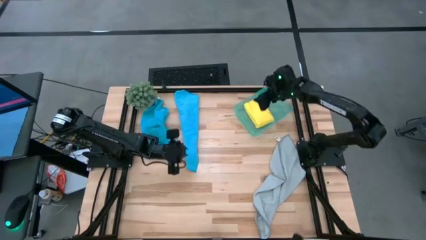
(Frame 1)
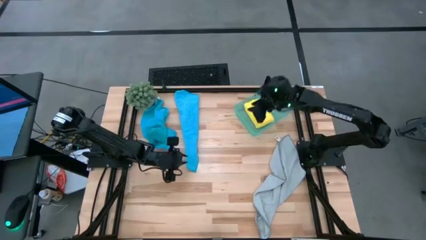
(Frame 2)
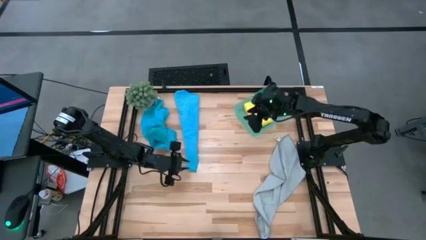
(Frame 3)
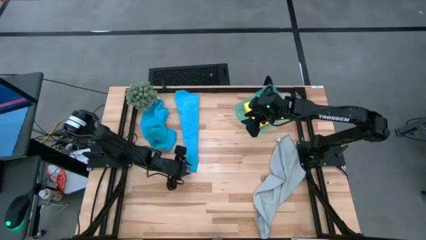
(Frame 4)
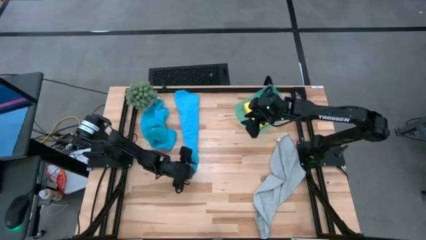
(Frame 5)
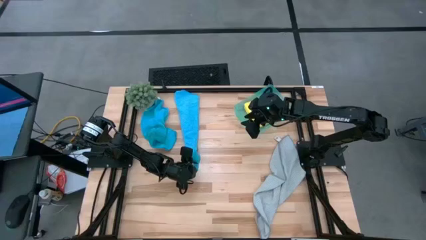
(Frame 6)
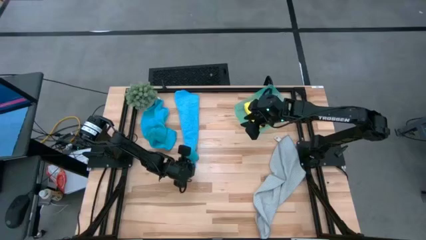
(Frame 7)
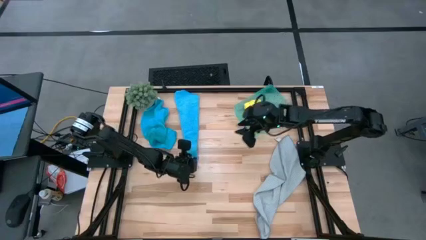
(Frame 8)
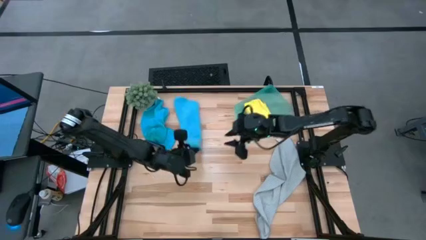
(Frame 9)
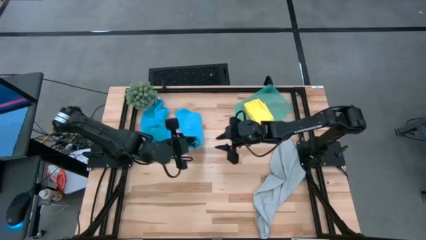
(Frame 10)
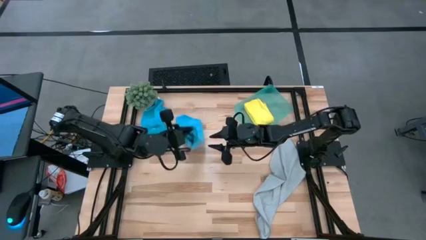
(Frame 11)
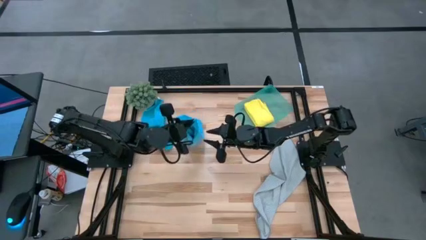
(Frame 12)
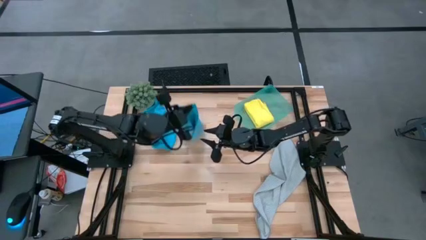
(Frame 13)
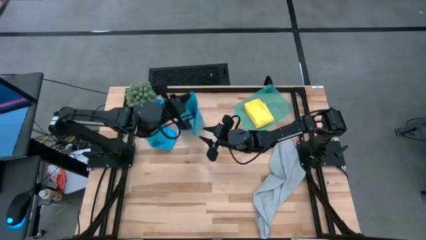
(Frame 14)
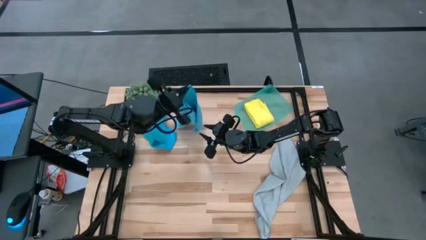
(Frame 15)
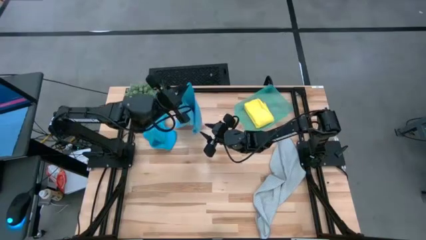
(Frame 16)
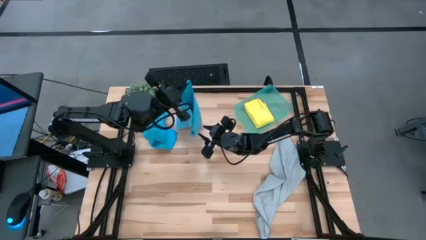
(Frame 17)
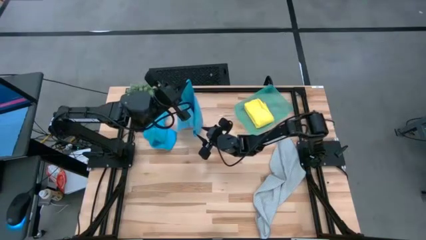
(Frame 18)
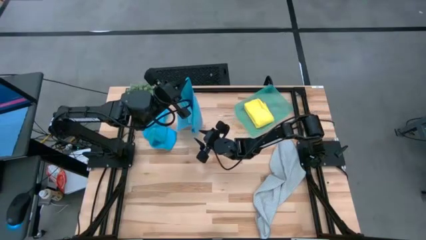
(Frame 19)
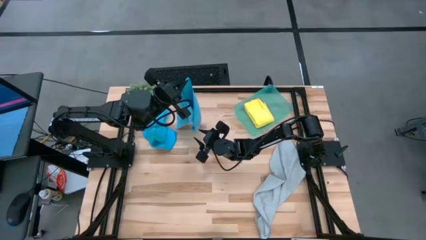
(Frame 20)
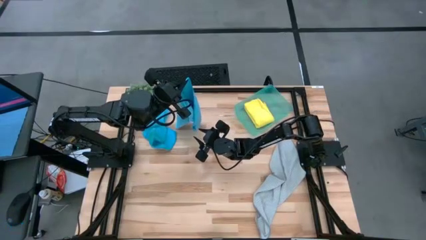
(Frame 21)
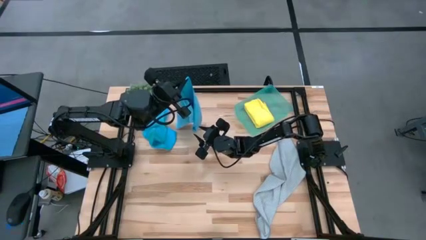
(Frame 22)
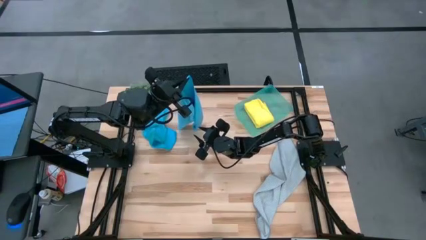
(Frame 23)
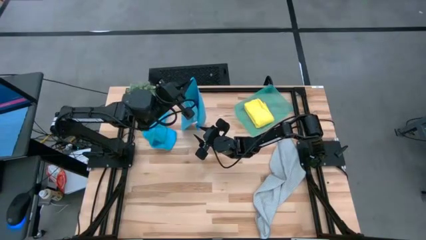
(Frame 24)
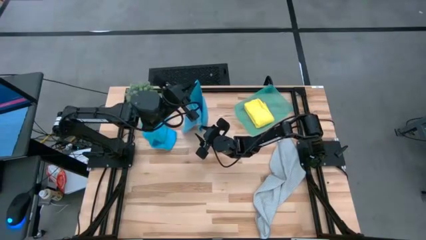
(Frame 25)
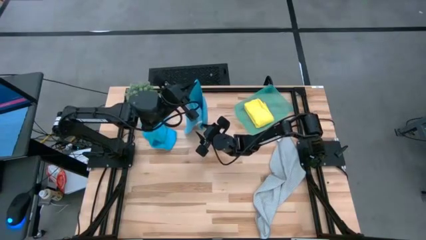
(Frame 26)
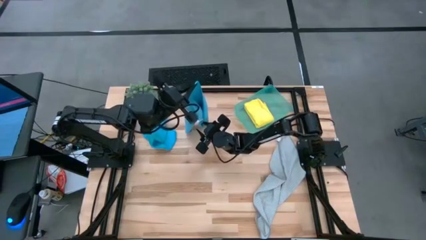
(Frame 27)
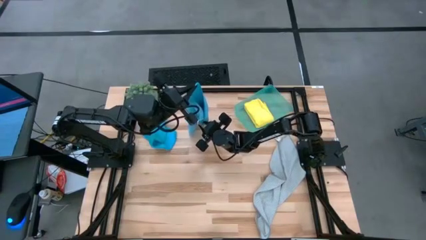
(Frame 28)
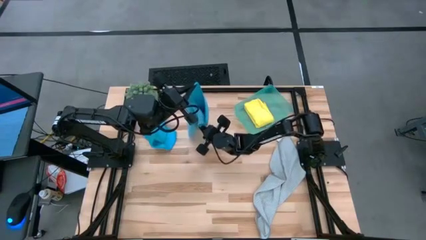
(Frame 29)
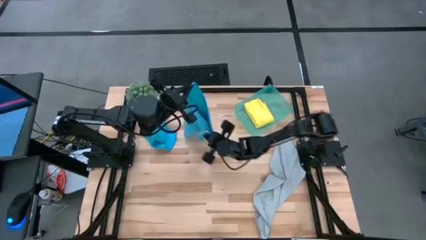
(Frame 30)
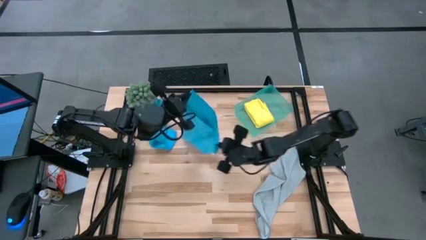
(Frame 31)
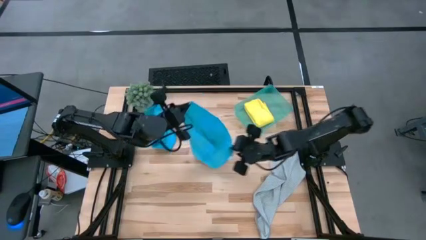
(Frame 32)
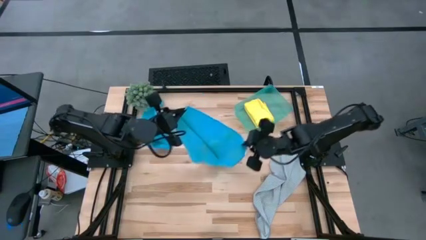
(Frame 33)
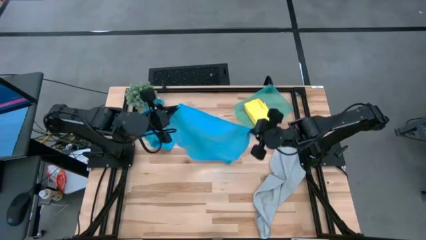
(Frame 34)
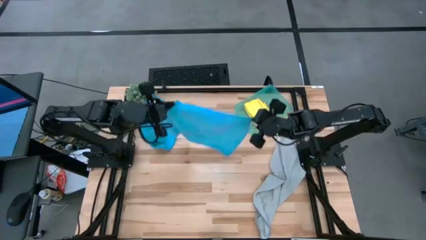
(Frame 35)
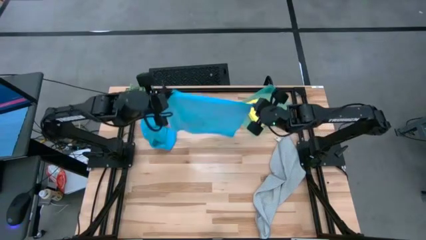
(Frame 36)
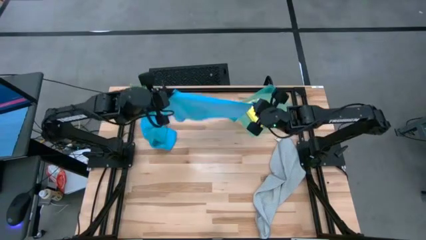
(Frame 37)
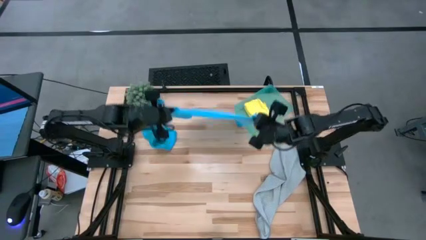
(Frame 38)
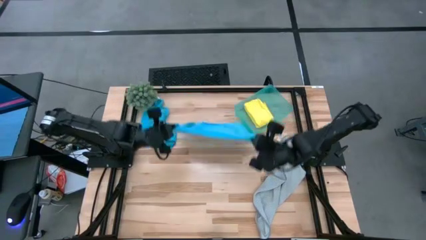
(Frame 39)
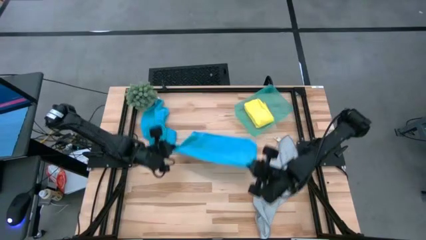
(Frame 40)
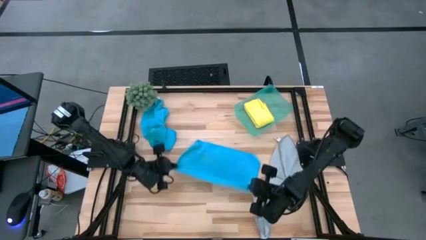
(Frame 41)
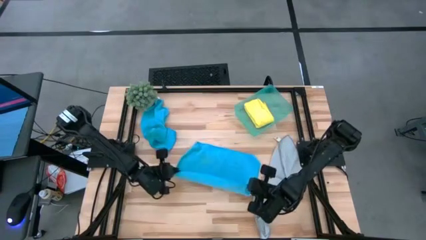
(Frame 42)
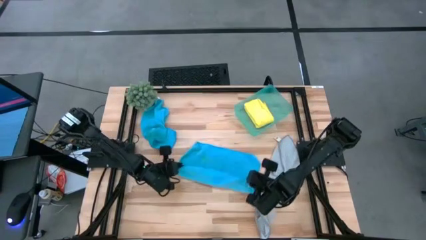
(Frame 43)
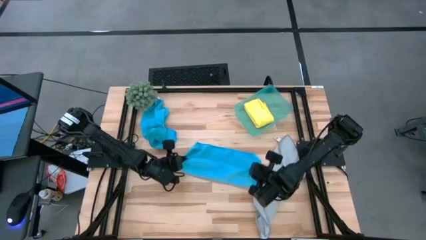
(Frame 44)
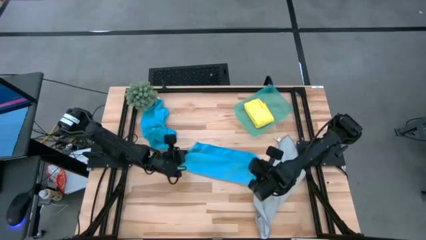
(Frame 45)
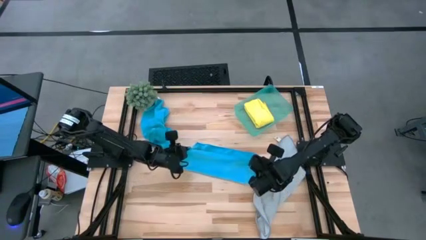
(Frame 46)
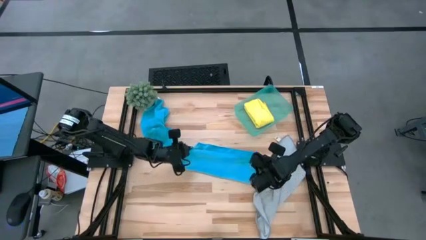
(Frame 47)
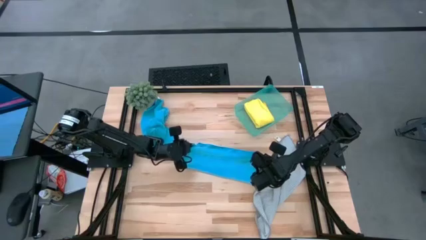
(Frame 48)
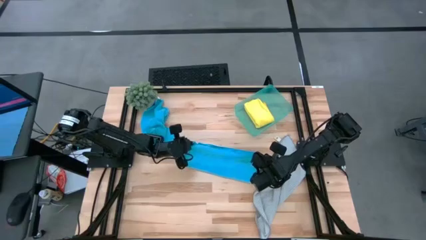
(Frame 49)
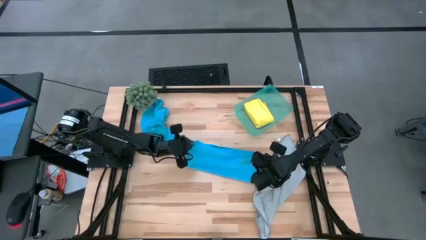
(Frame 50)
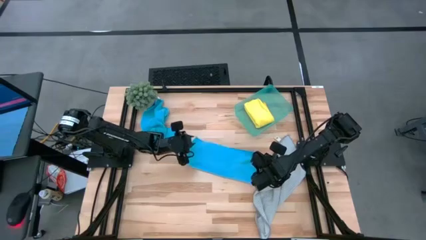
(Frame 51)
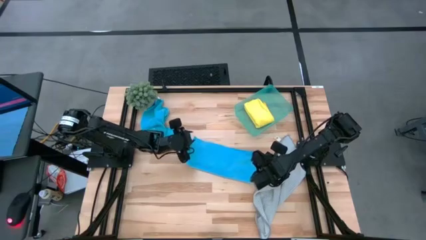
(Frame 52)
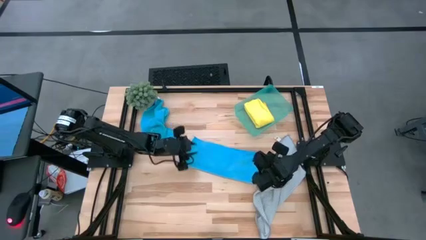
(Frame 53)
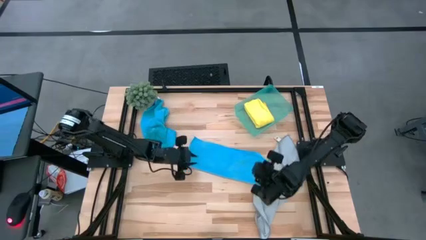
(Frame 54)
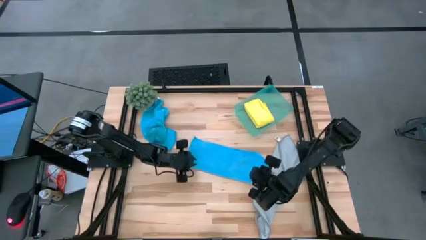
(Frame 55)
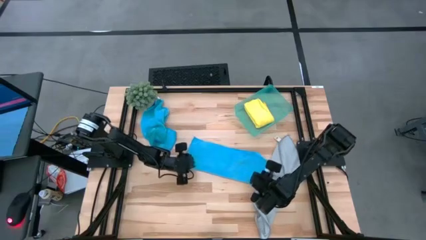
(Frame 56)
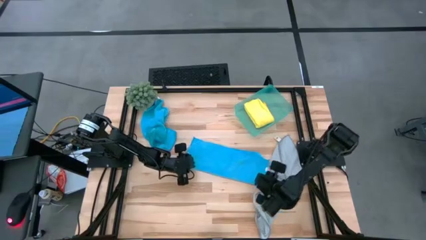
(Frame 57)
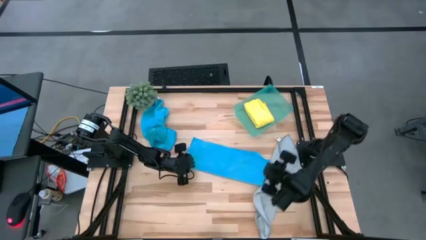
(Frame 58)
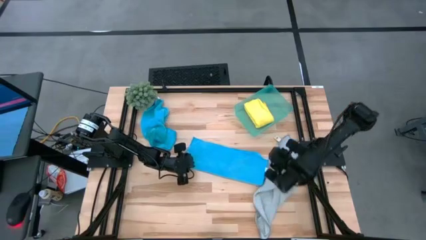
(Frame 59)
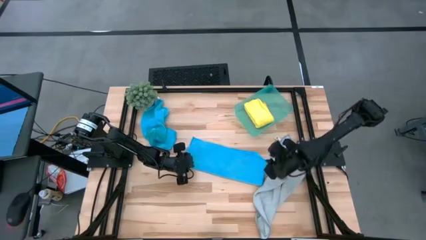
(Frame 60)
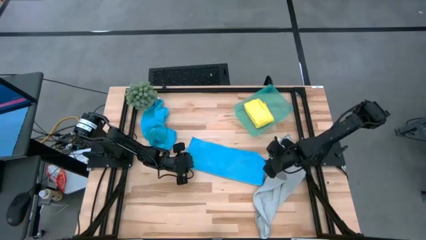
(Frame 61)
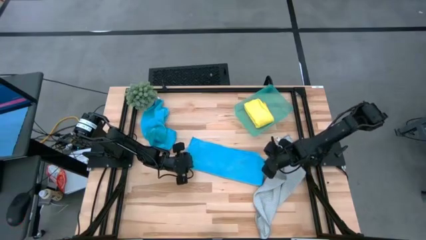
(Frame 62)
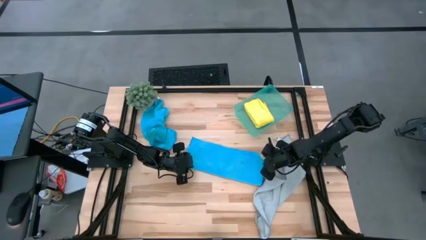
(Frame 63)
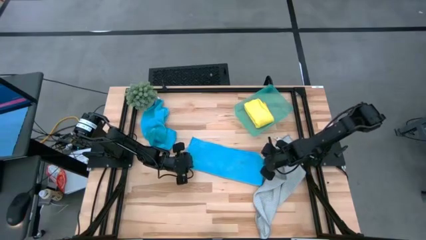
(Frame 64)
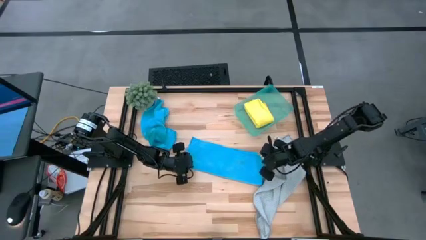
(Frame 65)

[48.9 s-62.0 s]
Task: Fold microfiber towels
Fold the right blue towel

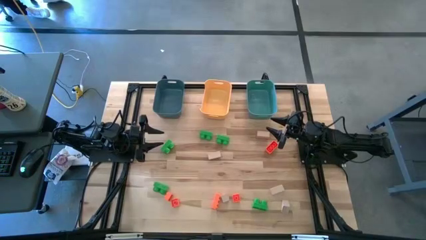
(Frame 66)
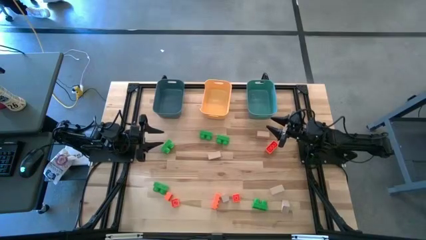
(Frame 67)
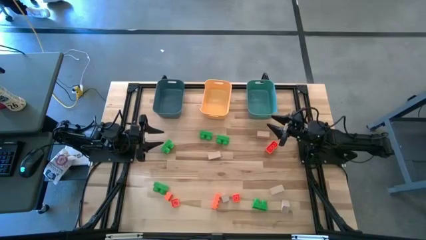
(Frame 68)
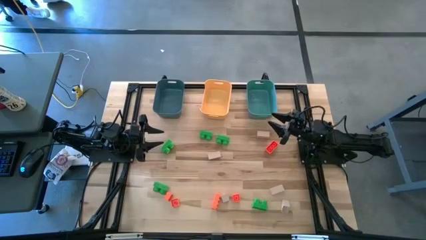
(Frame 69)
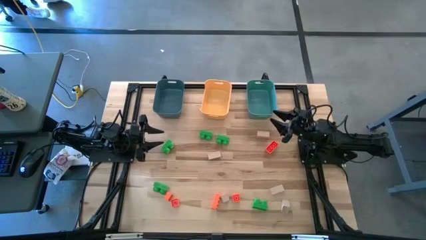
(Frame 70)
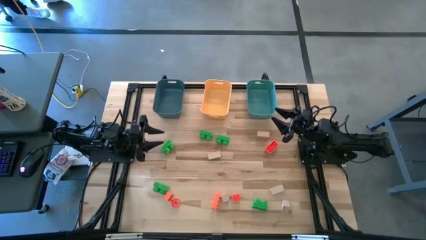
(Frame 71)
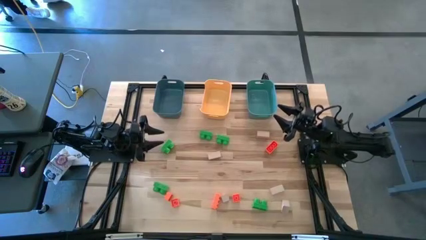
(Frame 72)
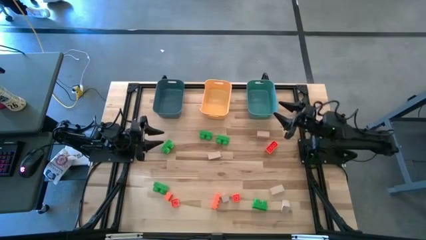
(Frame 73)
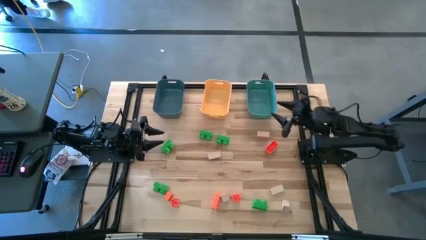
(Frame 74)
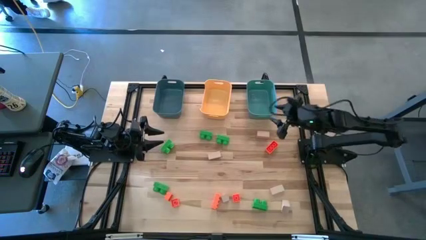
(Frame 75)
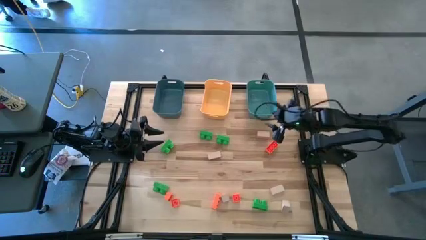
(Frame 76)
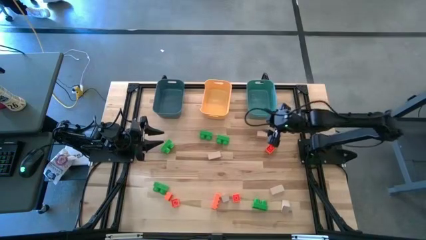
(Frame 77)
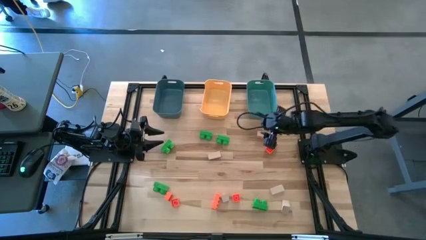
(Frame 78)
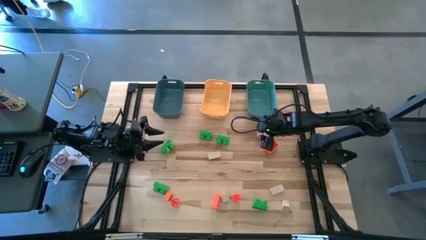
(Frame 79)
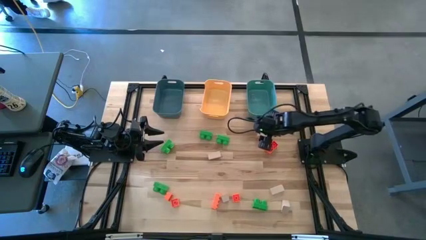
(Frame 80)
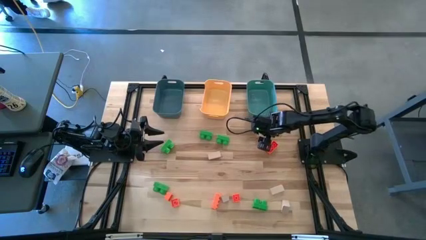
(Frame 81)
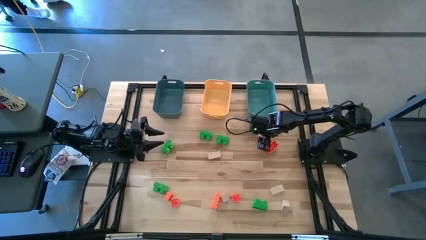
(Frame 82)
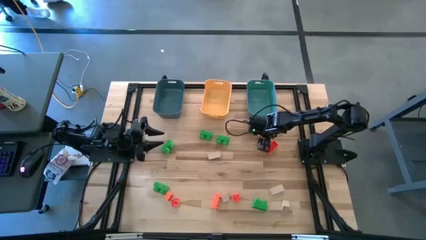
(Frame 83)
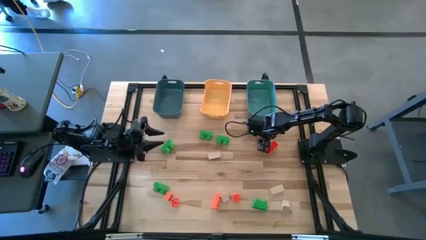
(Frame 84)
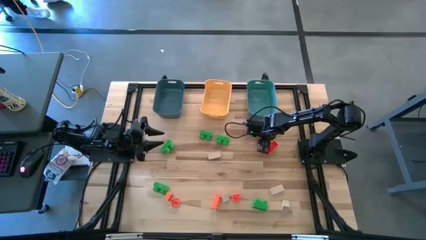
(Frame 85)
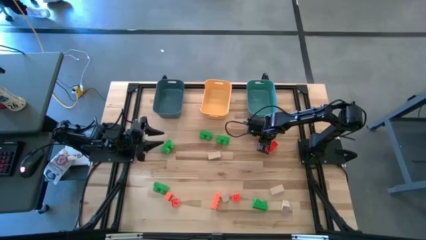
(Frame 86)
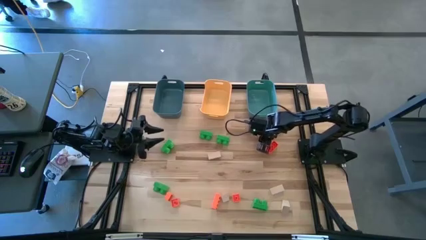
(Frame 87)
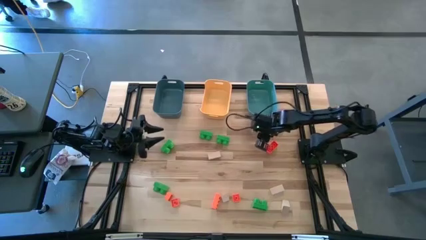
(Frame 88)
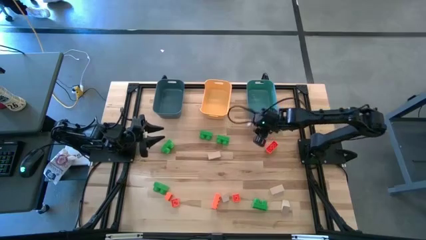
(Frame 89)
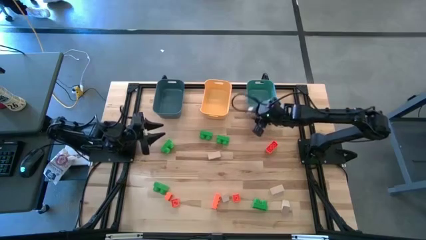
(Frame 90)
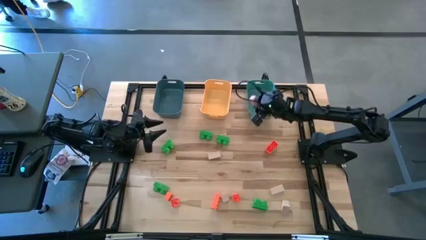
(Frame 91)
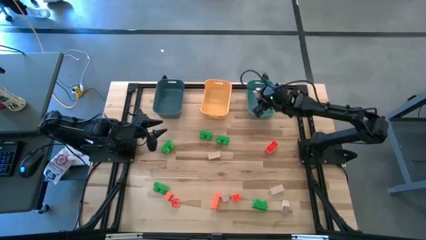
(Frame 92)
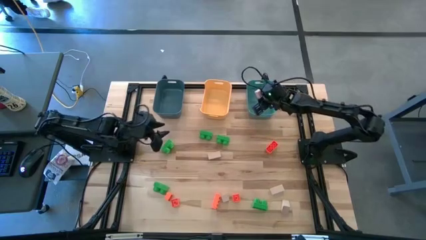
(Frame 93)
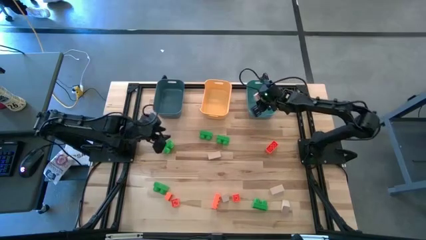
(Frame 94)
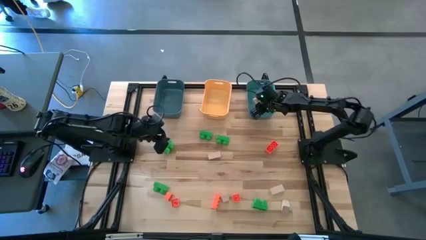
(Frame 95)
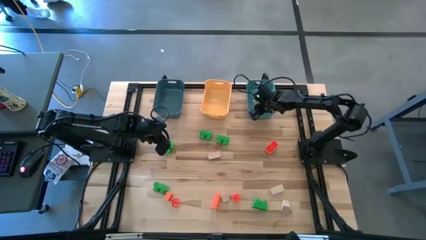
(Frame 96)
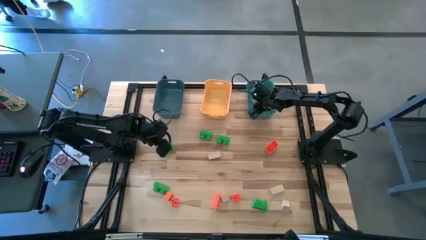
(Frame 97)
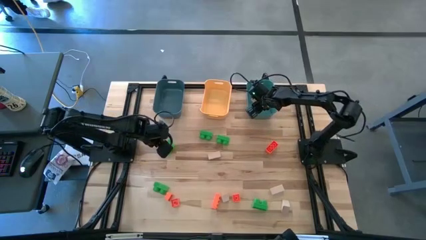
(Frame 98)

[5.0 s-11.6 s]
Task: Sort & place blocks by color
Put the white block into the green bin
